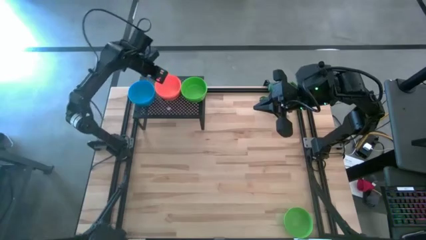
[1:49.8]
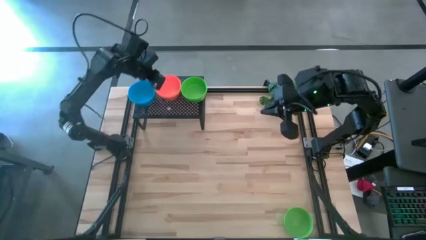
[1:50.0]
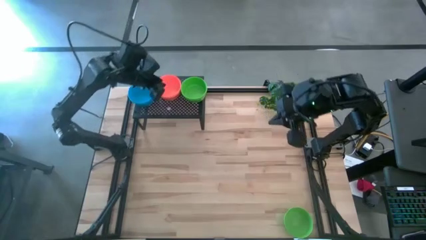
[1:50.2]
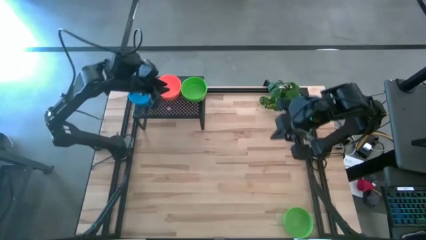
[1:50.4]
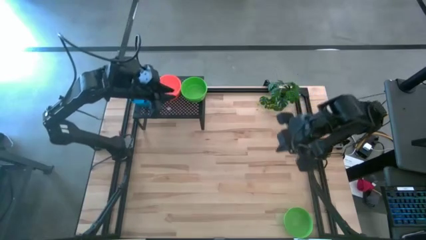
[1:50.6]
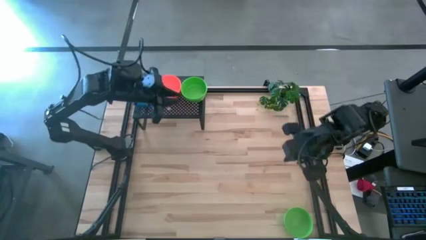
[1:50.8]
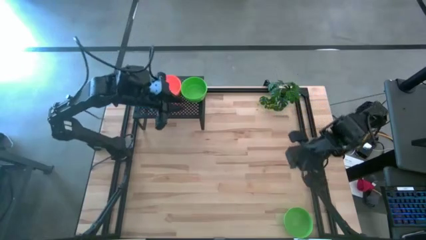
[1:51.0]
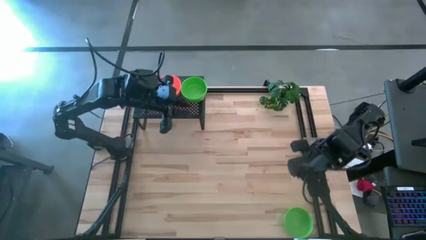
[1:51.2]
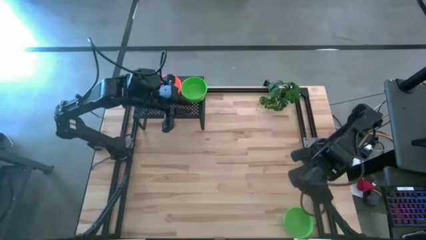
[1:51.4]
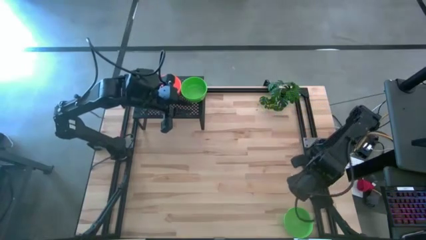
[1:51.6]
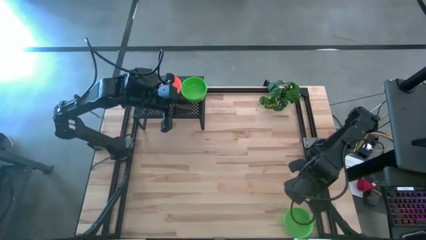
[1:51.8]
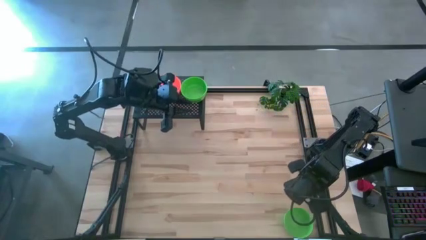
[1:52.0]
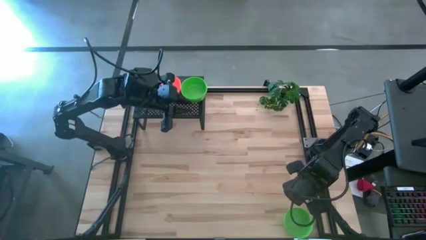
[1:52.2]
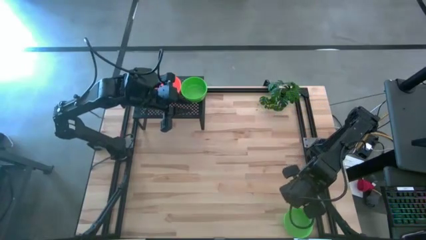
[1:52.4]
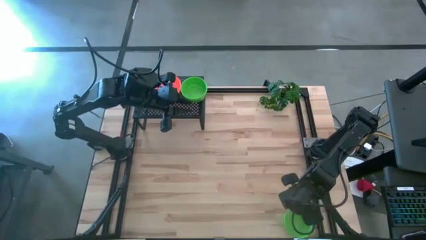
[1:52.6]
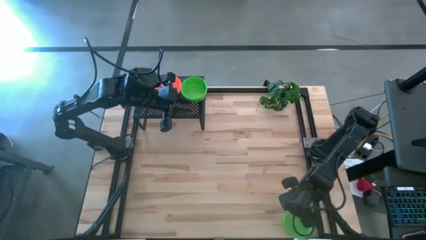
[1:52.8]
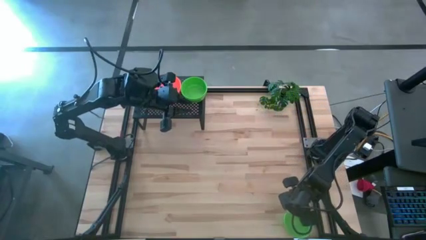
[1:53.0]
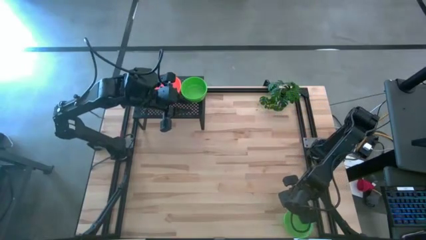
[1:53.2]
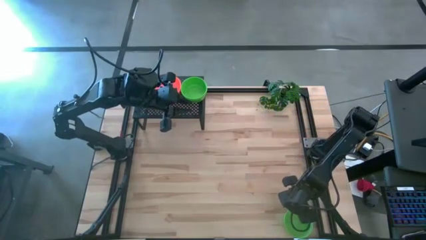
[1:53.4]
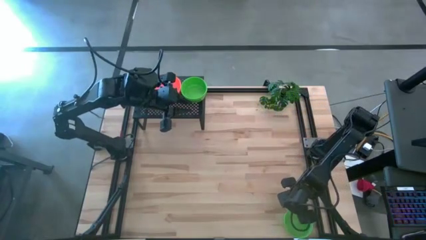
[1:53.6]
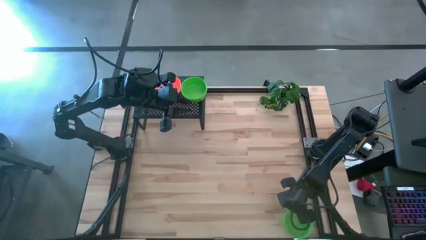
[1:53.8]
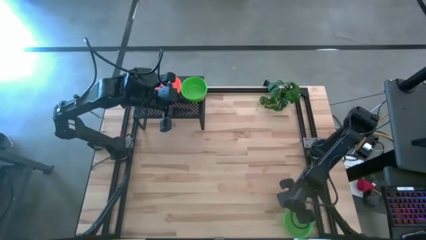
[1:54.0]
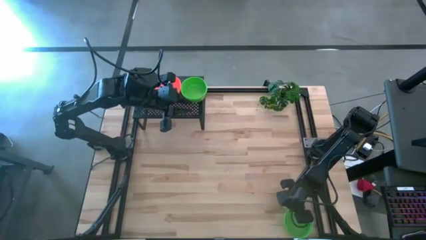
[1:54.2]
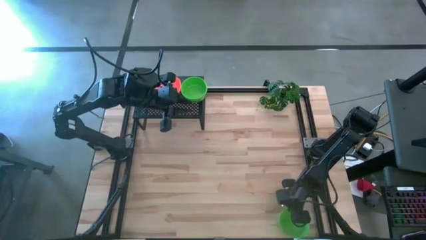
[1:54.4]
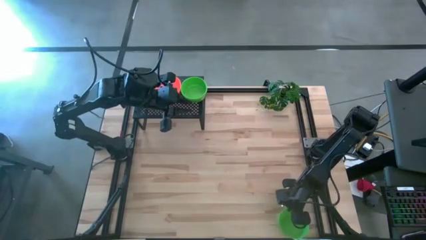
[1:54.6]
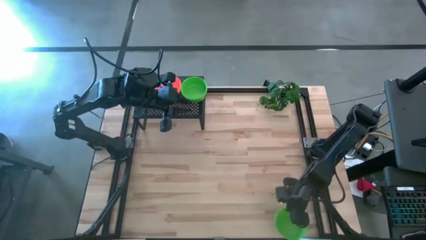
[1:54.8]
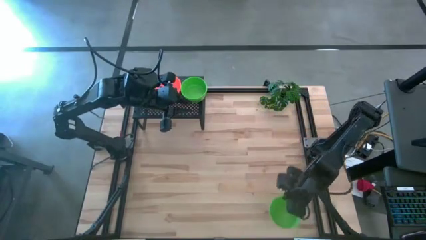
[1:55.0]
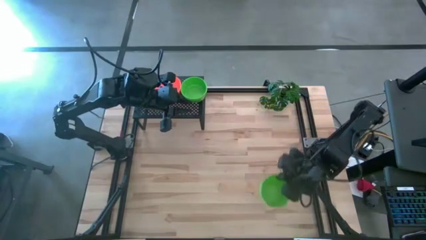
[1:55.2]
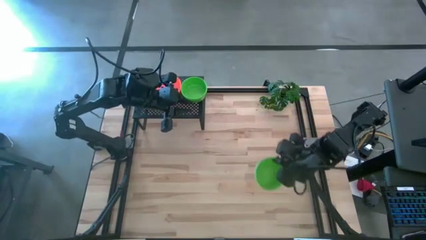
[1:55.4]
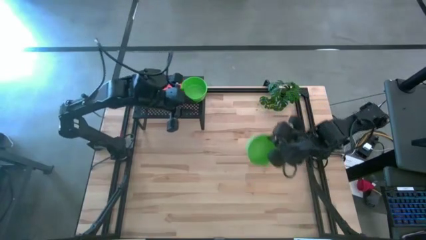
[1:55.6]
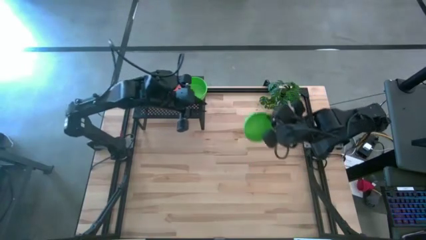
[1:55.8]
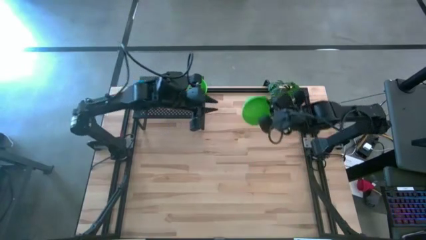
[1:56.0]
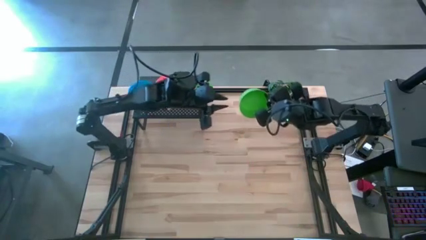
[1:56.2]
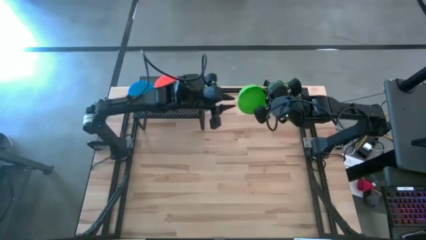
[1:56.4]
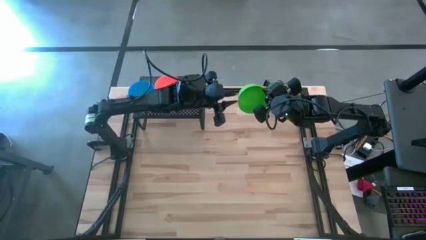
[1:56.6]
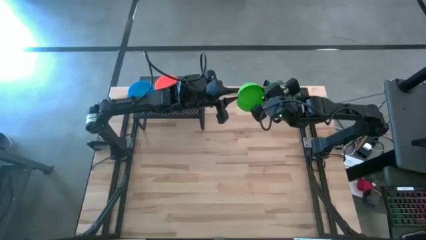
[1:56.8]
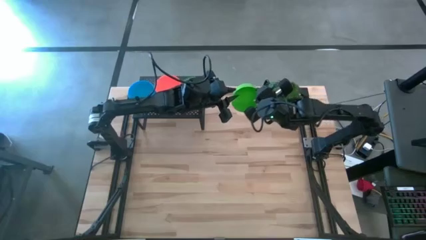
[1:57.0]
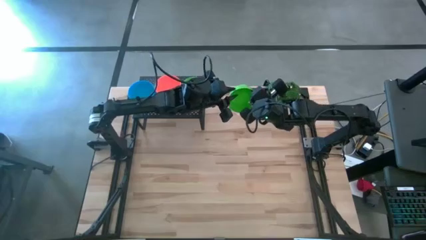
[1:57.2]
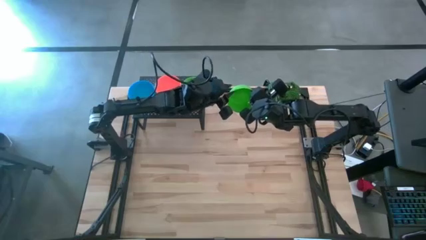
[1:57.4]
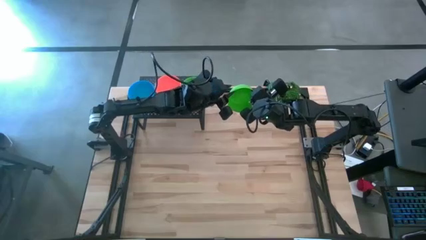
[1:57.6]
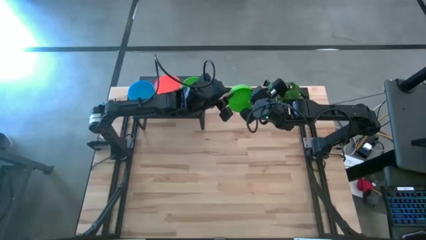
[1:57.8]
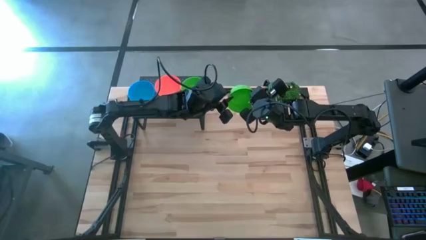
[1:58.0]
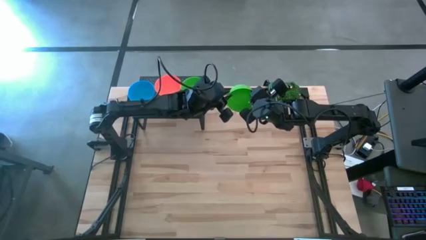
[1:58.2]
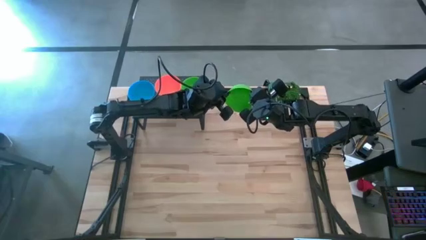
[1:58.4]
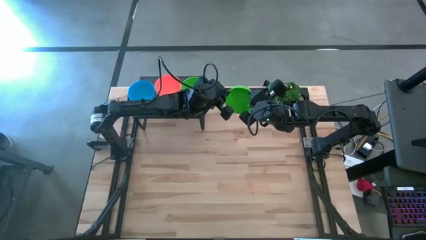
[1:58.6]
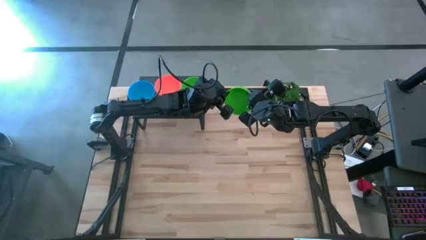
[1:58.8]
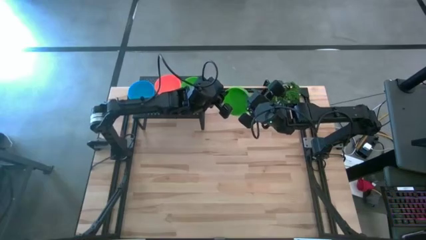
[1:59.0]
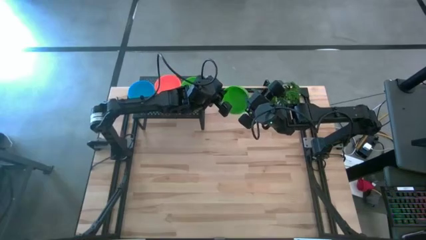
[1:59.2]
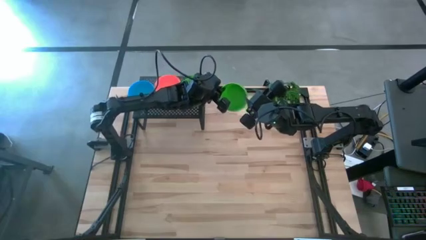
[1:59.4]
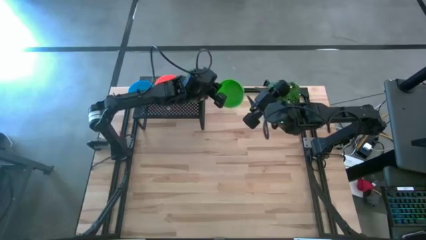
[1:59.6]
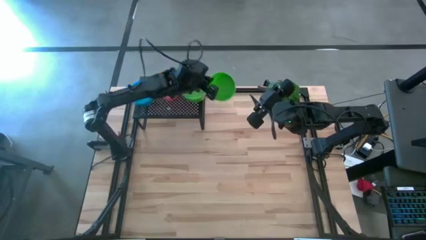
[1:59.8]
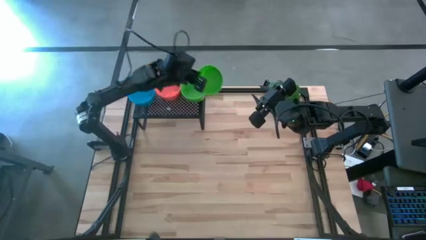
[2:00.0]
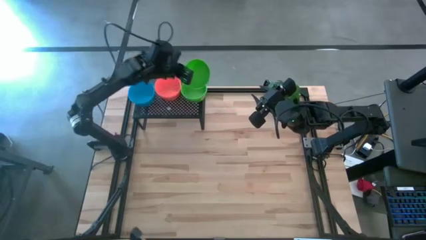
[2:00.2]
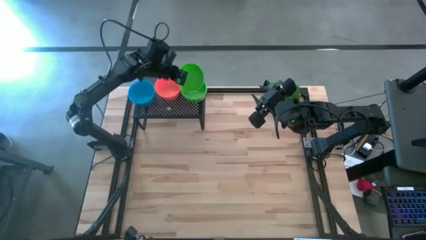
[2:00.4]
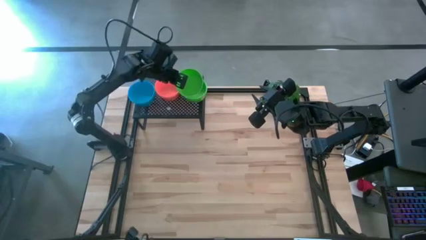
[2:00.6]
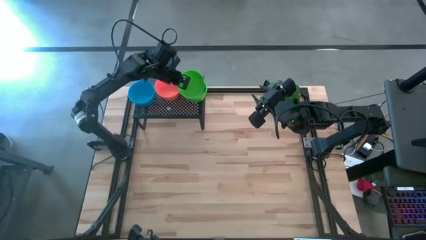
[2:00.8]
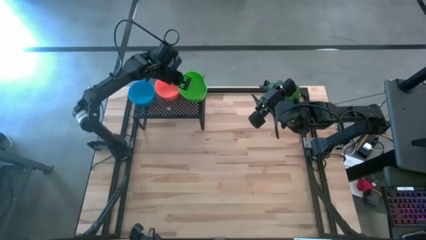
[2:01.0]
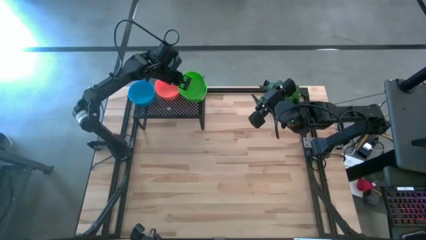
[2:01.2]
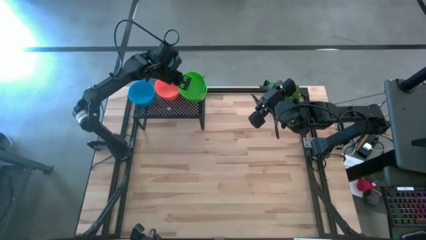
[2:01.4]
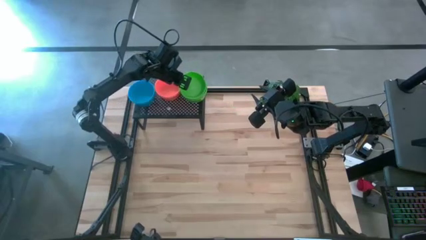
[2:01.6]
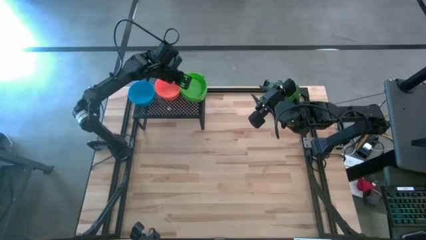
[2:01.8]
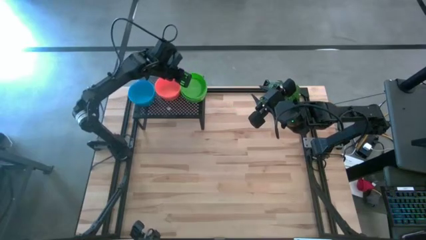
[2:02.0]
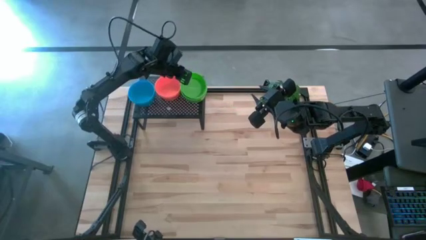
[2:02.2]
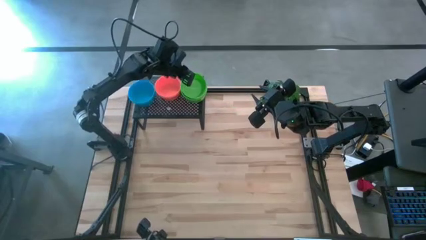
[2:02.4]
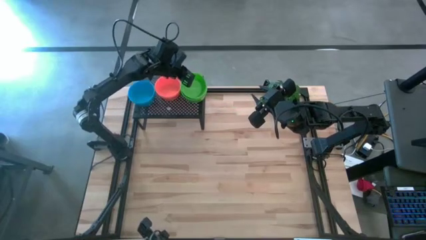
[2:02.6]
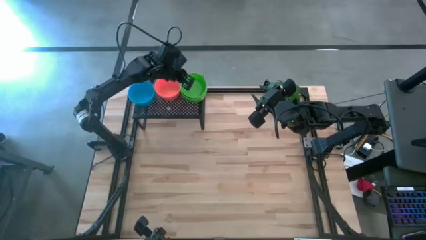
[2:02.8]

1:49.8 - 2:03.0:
Task: Pick & Place Mini bowls
Stack the green bowl on top of the green bowl on the shelf
